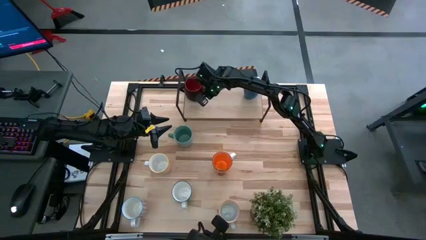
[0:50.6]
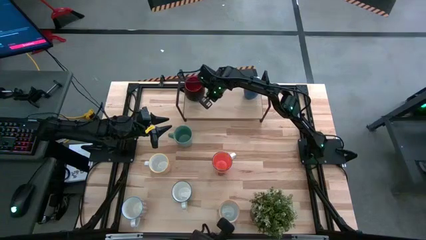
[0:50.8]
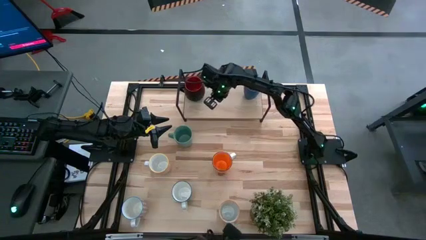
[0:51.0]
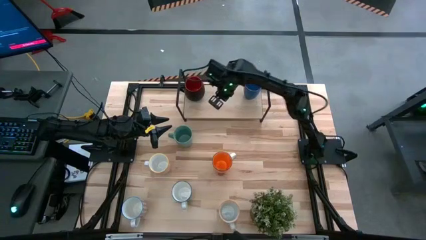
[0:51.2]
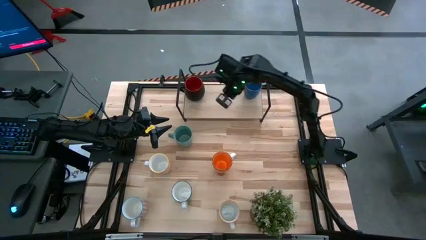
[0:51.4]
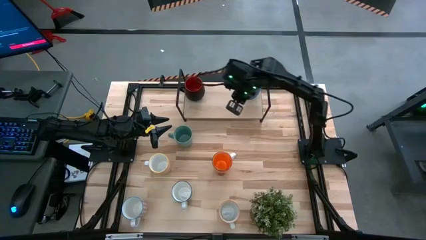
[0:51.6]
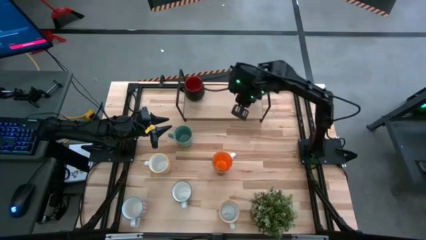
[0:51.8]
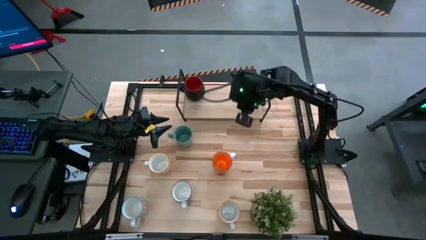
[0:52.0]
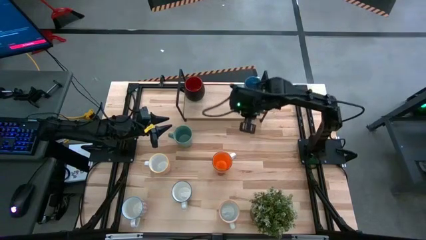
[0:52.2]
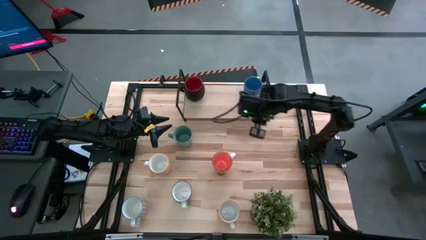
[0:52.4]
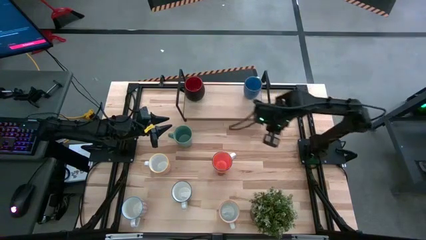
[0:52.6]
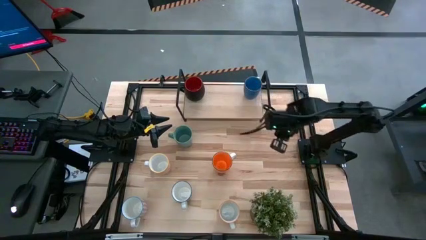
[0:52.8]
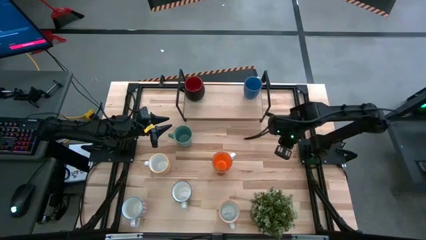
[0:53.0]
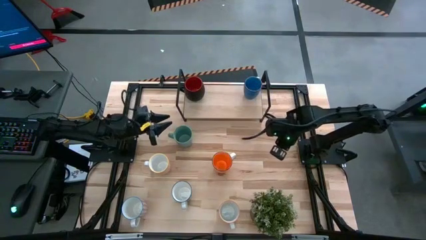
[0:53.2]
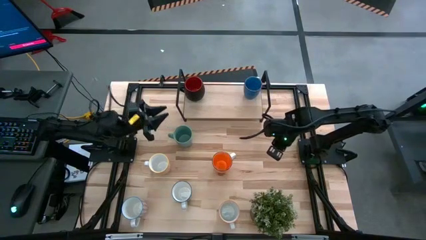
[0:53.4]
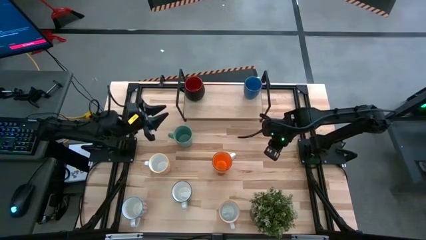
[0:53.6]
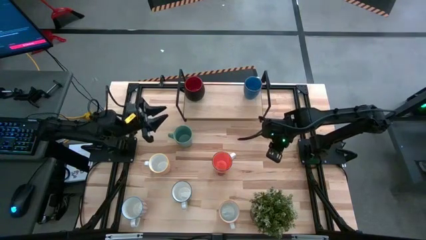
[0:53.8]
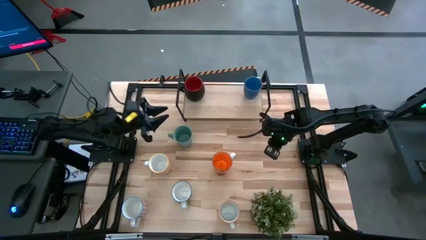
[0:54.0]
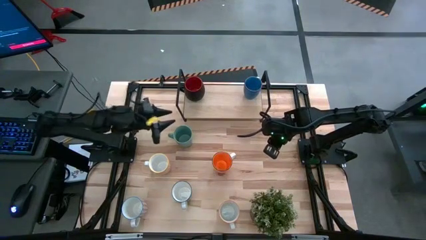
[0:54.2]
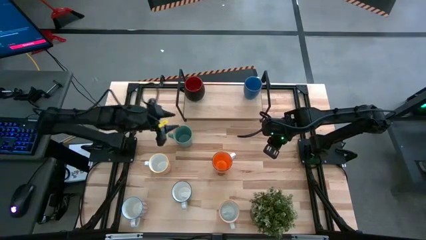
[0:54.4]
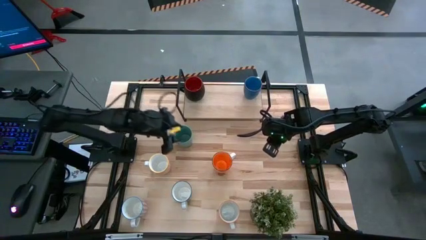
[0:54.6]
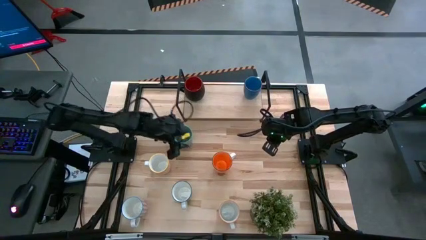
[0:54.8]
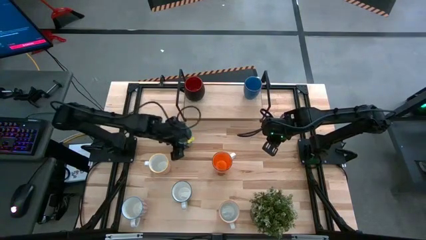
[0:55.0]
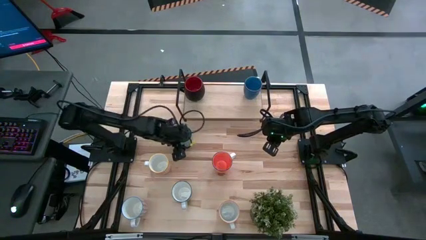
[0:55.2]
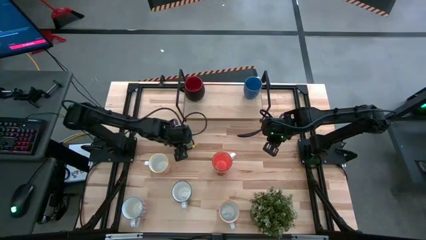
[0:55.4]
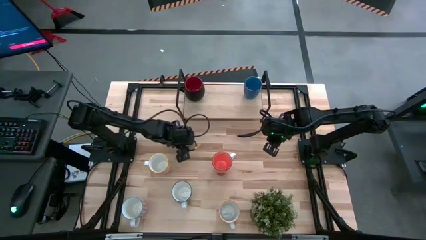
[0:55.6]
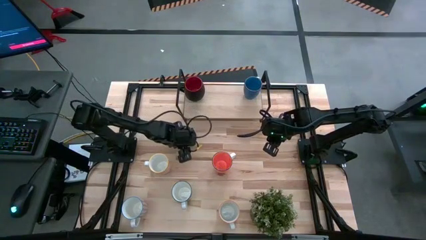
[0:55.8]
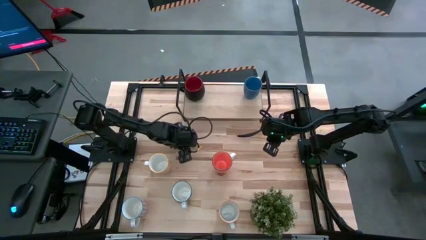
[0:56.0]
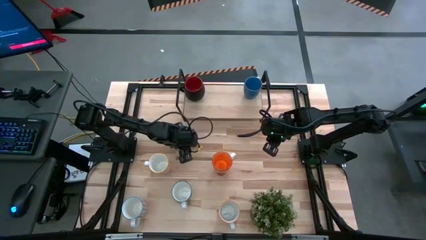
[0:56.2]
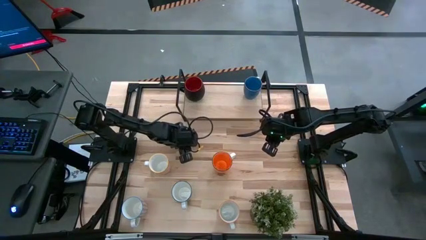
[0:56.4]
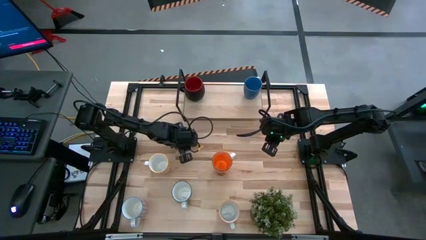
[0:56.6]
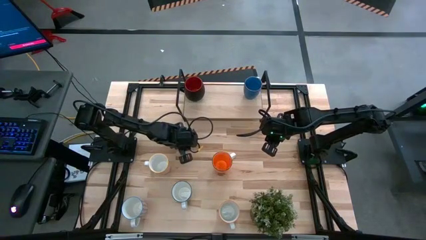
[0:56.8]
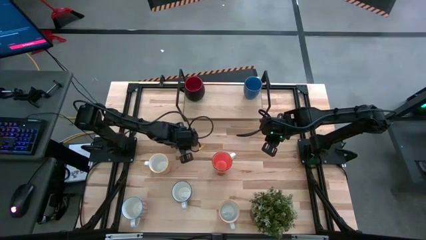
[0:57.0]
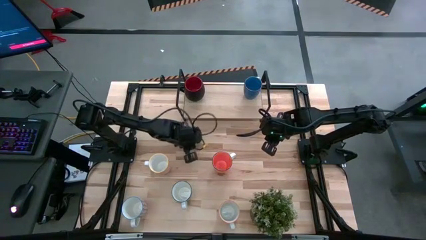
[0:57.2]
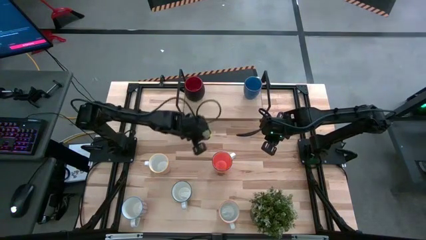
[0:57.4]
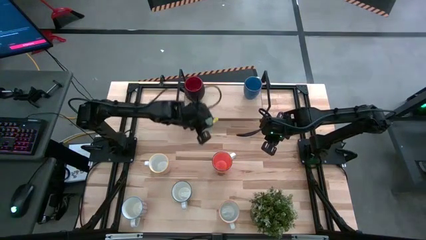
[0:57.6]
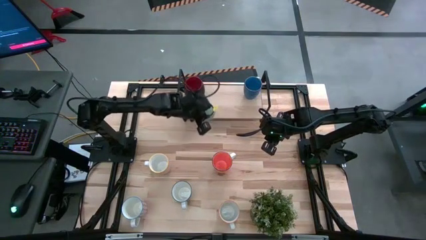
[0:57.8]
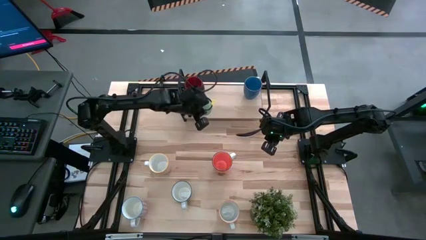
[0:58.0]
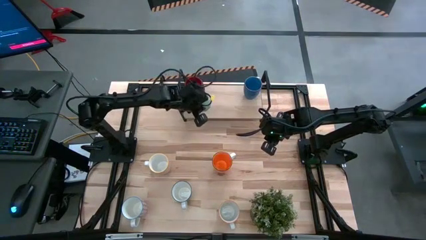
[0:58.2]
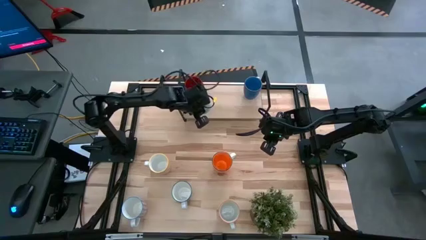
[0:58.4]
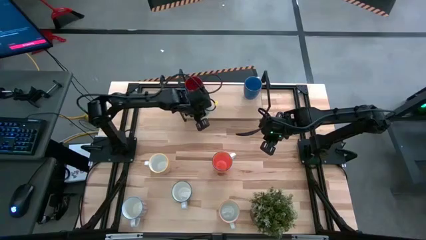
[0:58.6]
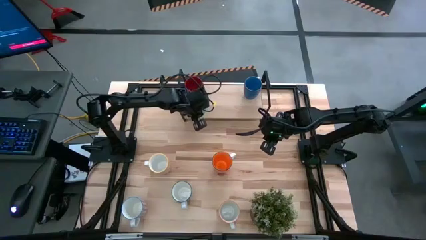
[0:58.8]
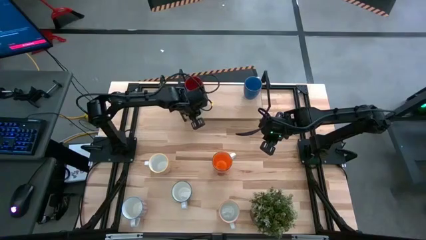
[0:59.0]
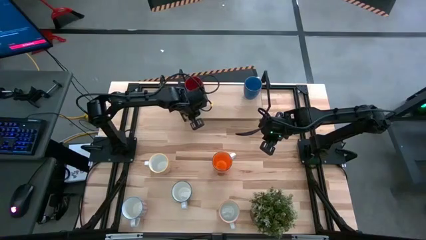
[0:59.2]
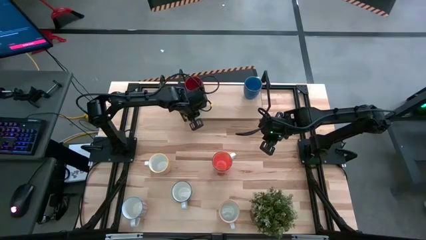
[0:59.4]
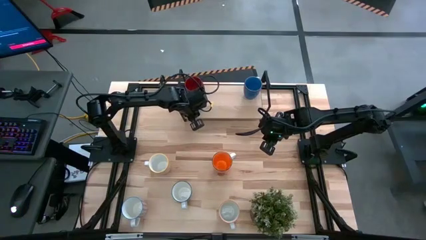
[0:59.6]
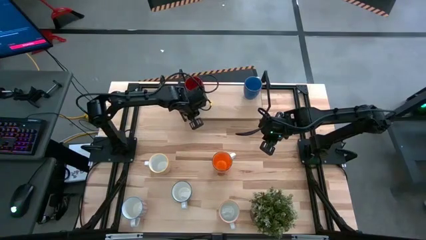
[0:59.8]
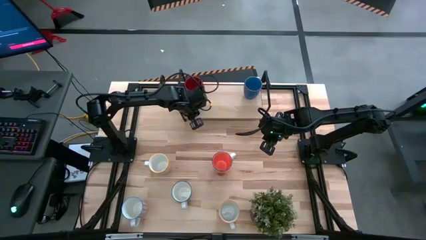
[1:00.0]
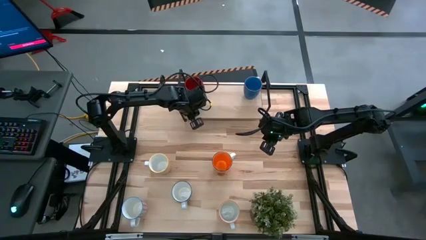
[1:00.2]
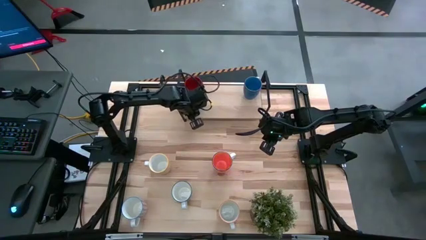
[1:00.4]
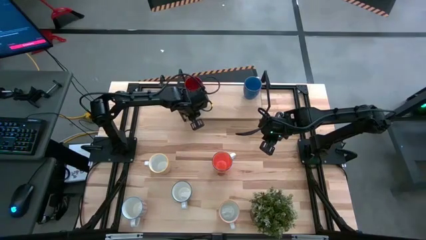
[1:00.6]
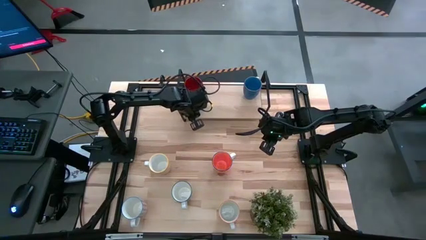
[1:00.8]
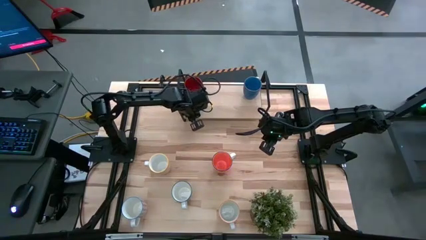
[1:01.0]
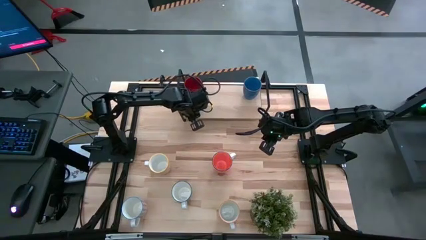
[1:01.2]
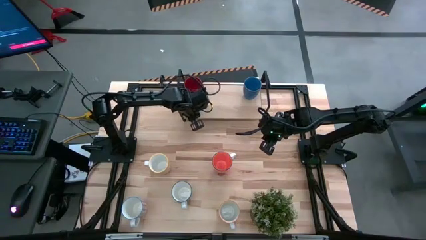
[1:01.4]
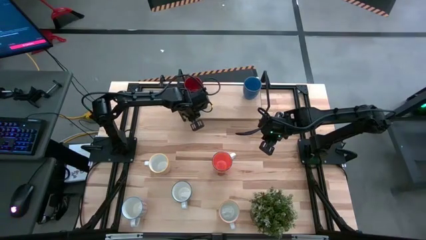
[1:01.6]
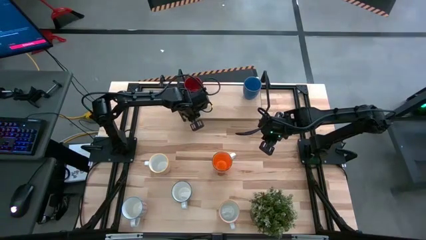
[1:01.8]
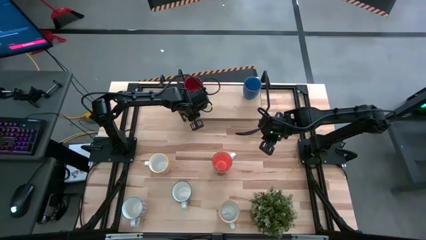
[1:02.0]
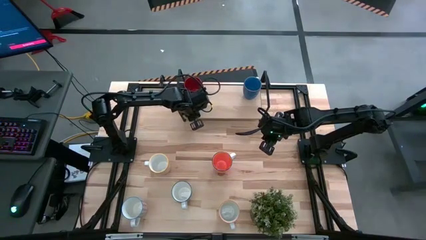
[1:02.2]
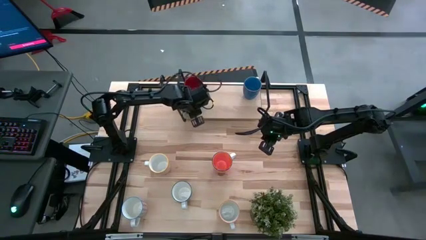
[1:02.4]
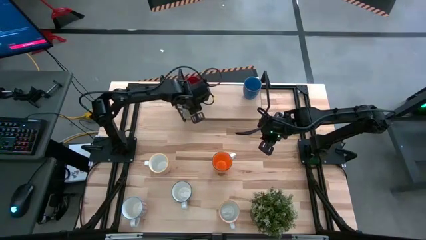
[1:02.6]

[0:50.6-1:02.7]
Task: Place coffee mugs
Put the green mug on the shelf

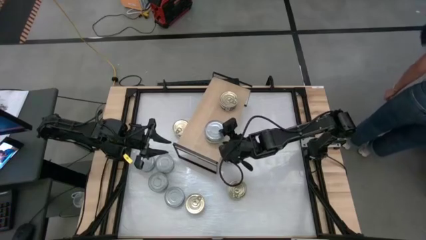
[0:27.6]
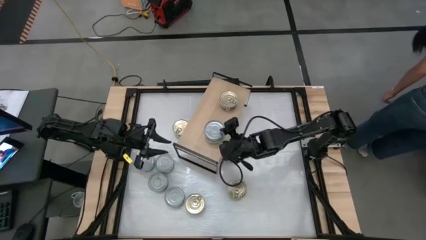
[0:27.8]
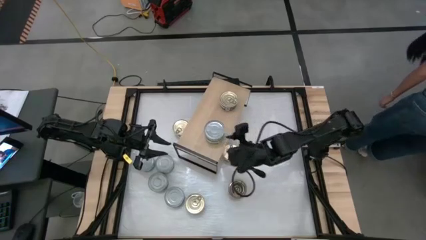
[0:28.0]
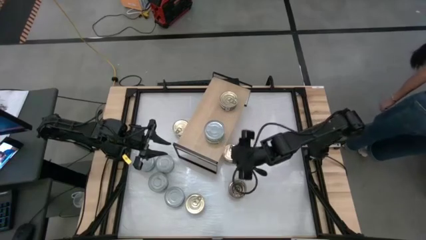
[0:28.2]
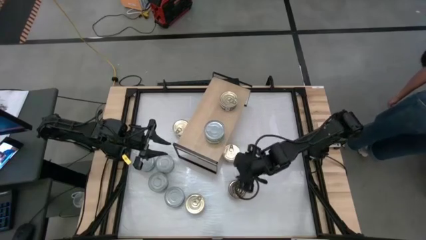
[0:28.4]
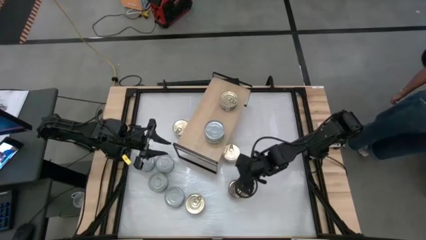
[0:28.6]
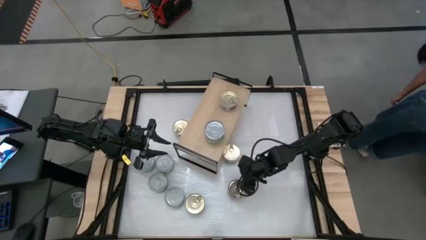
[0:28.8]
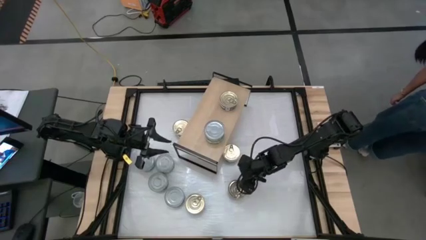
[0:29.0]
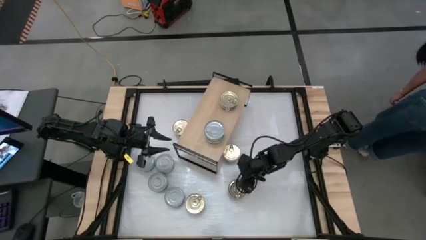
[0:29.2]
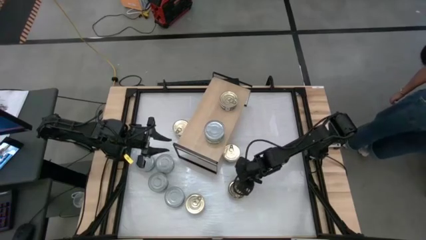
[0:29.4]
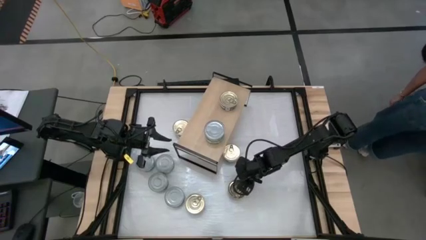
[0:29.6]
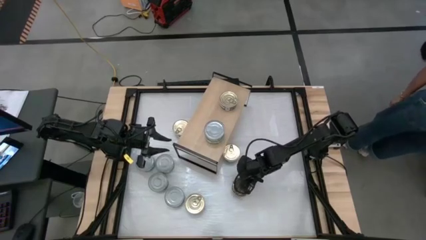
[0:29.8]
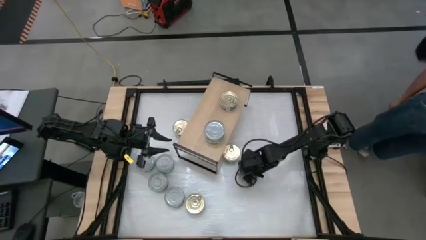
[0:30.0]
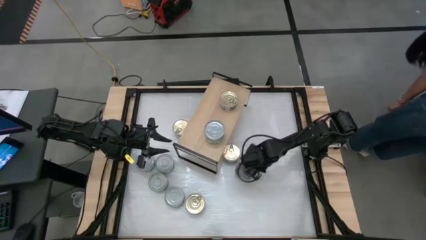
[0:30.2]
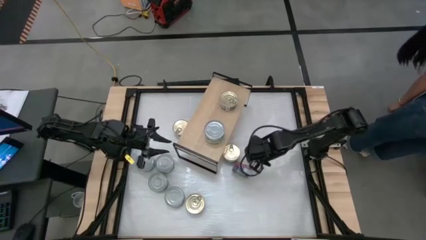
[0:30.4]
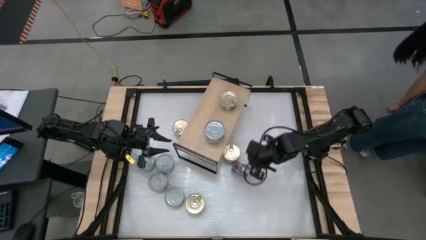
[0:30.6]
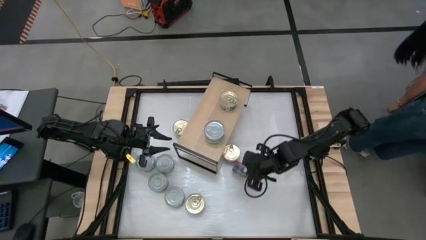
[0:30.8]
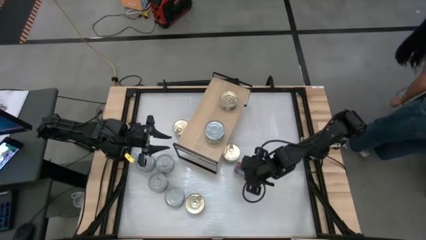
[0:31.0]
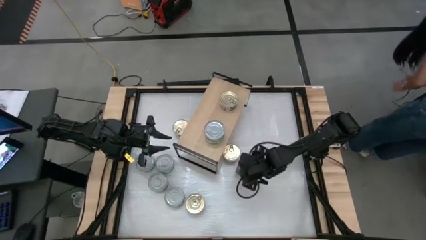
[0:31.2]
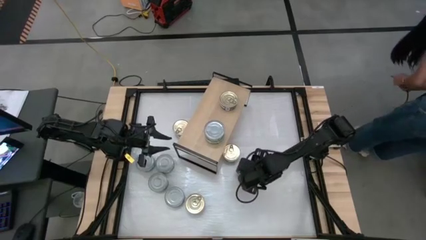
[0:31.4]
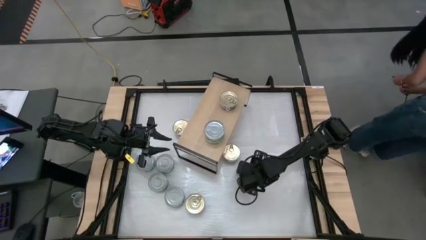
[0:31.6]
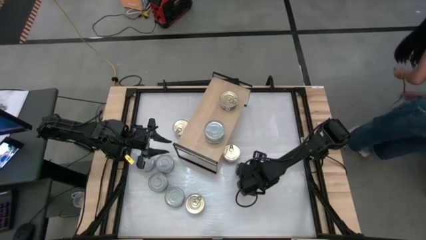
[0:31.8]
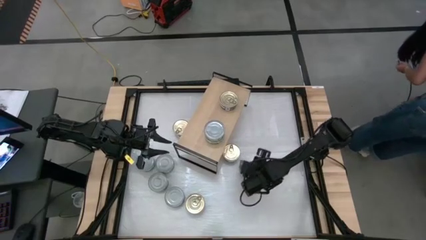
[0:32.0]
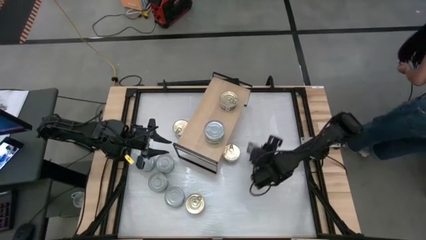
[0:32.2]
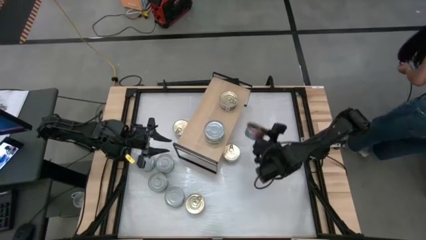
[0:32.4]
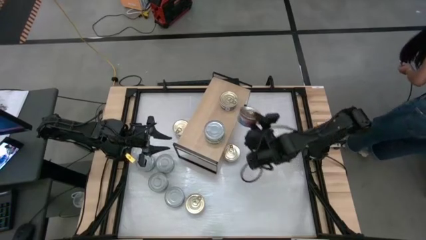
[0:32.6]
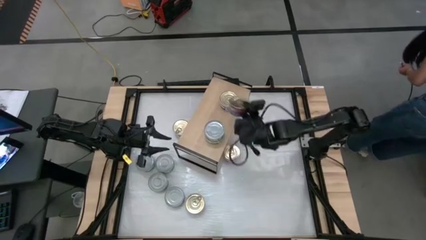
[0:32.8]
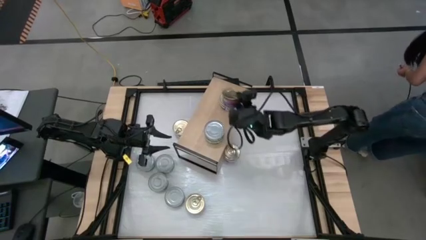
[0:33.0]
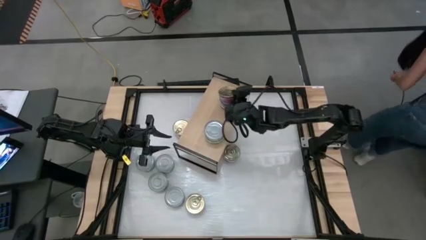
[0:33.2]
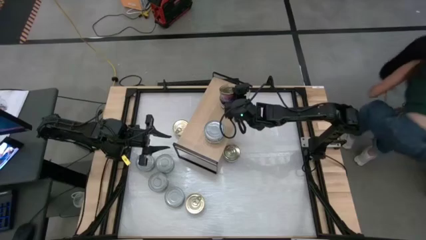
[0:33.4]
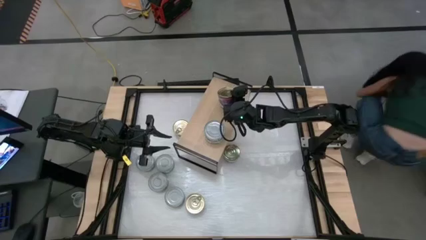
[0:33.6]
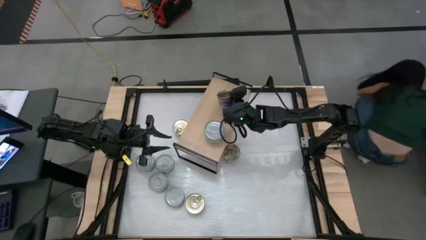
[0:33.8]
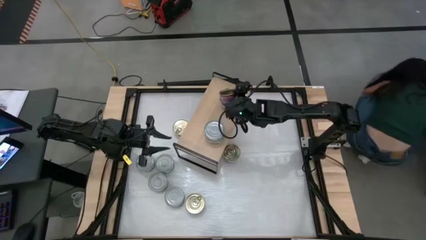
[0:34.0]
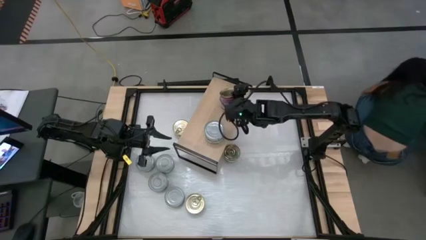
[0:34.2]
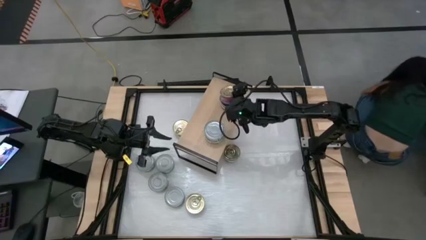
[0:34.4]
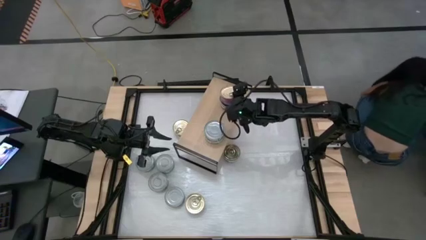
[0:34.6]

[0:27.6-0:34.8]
Task: Stack canned seafood by type on shelf
Stack the blue tuna can on top of the other blue tuna can
